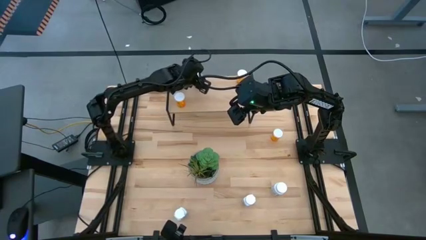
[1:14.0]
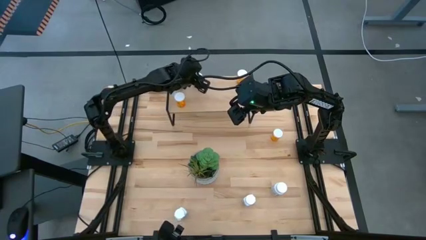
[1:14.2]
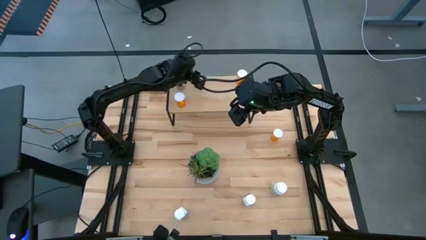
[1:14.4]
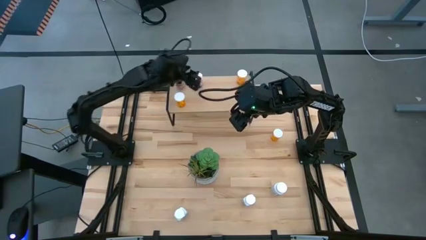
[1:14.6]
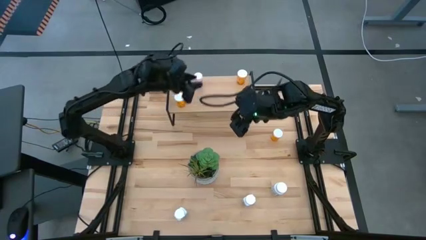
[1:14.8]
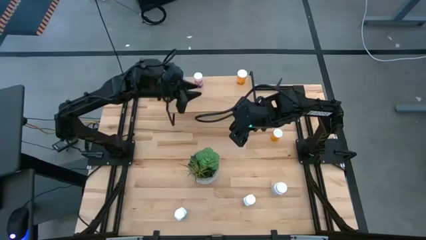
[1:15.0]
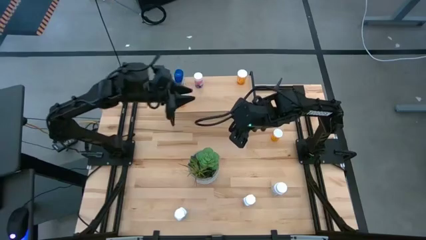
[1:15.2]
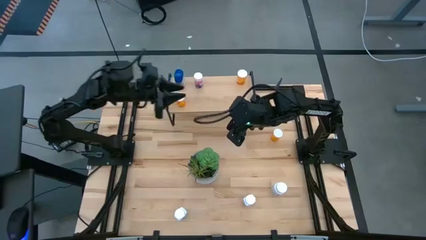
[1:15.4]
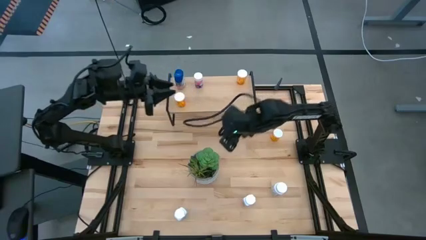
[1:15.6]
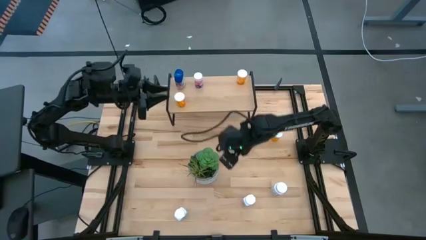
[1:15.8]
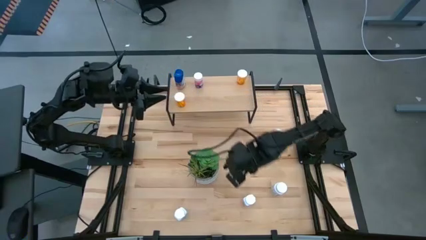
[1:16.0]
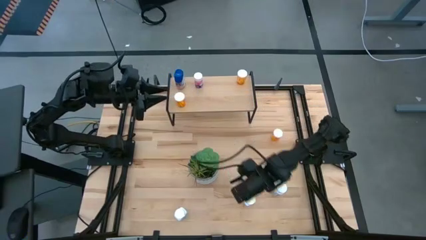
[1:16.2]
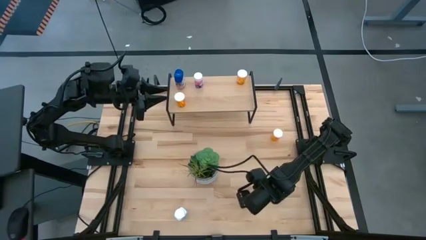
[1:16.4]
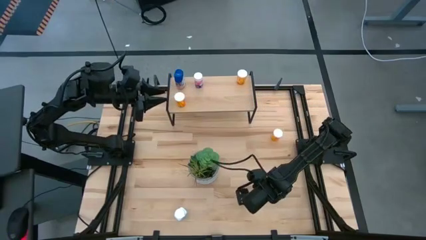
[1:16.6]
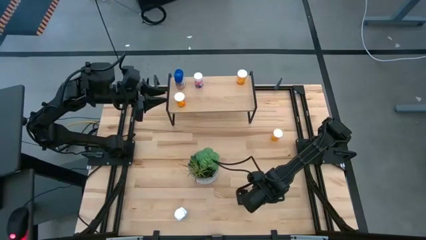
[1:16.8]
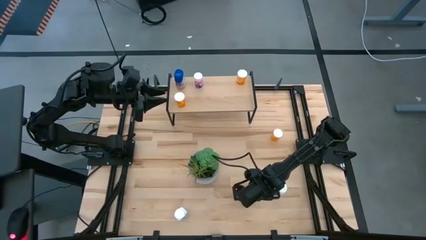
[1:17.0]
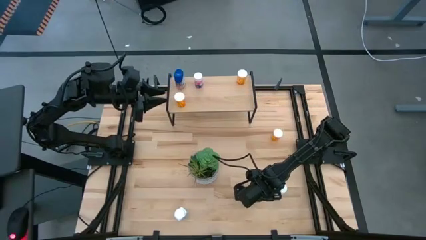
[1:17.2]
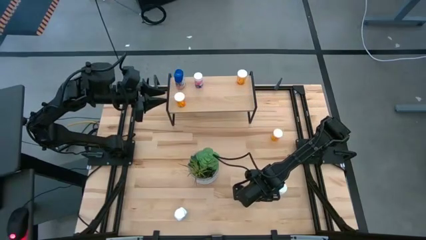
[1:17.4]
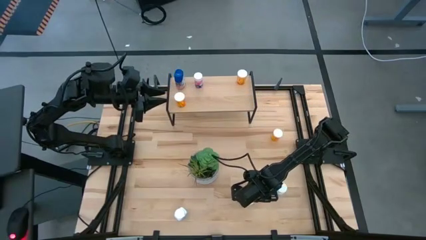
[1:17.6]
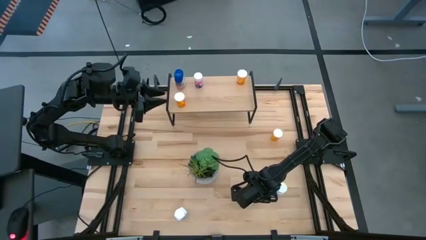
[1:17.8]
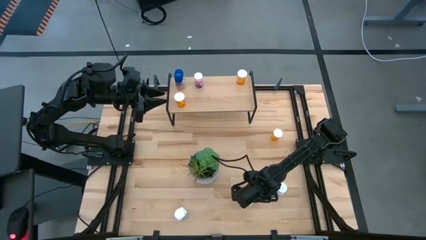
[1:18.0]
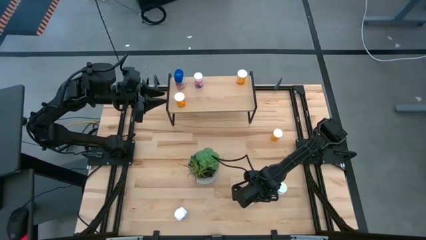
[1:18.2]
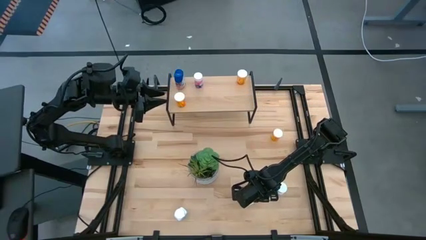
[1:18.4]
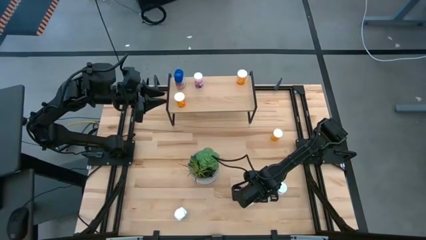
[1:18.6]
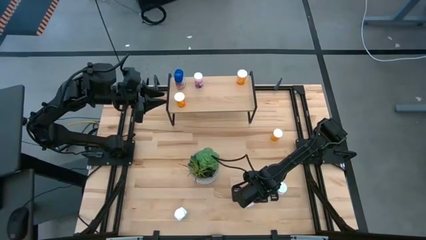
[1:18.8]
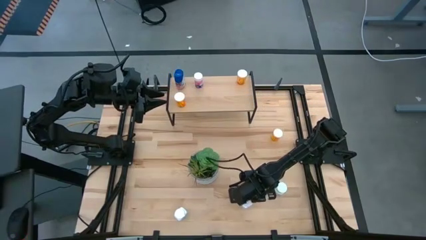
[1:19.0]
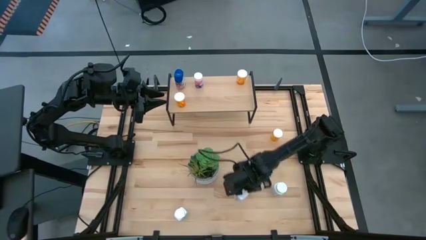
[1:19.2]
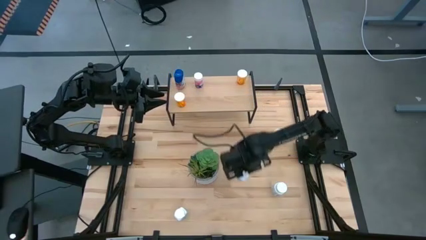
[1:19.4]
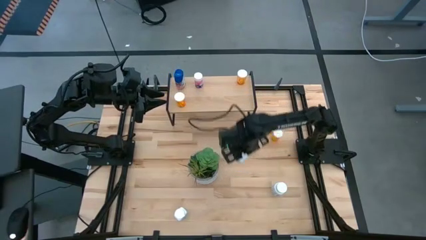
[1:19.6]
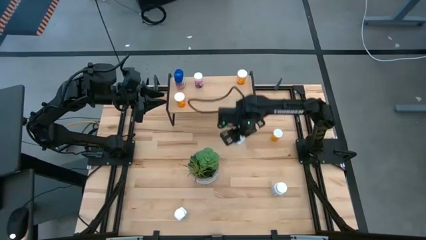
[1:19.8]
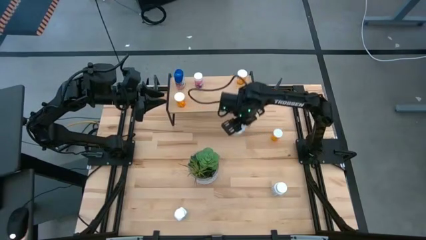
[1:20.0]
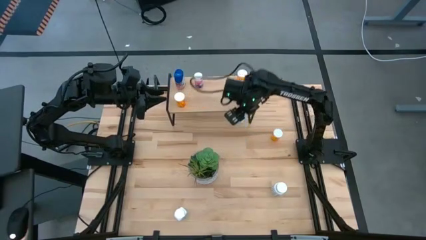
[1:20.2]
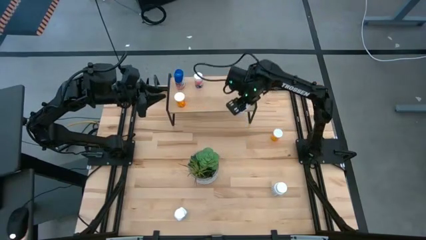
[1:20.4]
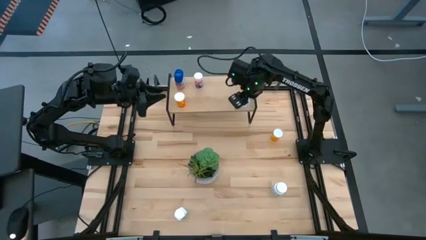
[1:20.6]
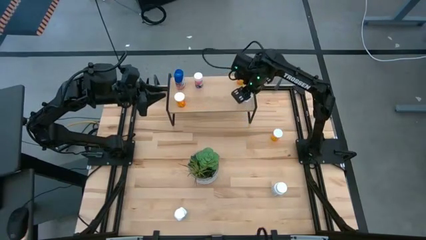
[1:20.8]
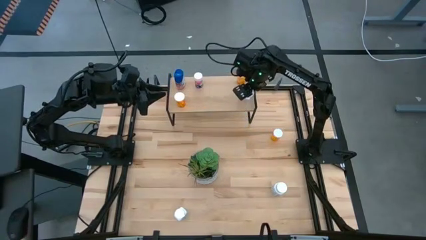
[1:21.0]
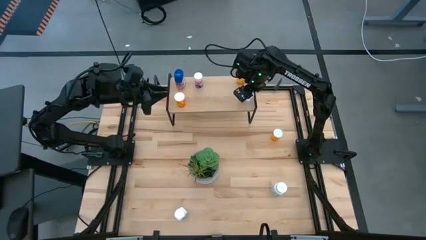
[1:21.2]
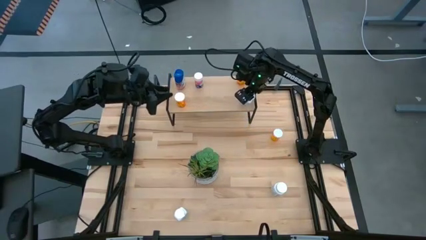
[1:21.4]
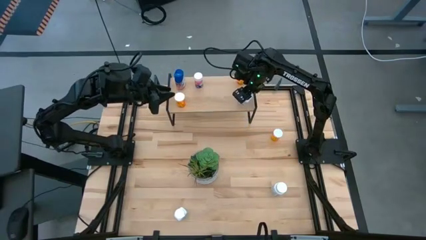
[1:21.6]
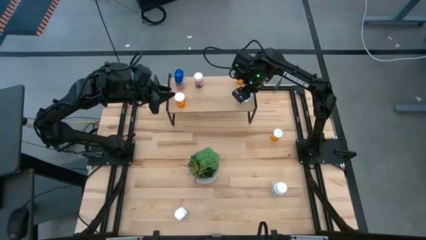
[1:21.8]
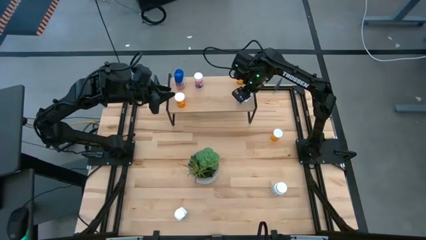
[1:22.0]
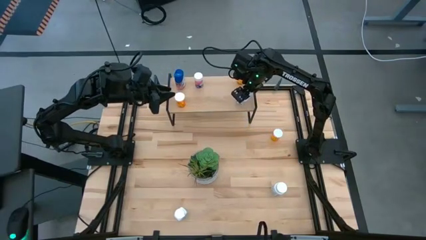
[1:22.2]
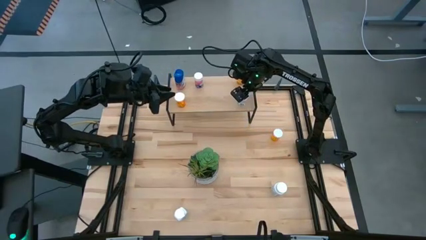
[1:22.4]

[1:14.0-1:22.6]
Task: Pick and place medicine bottles onto shelf by color
Put the middle white pill bottle on the shelf
